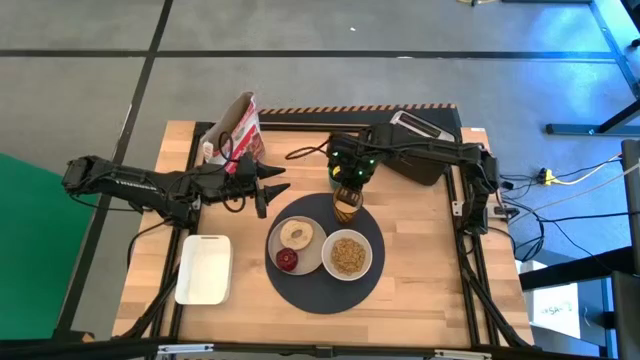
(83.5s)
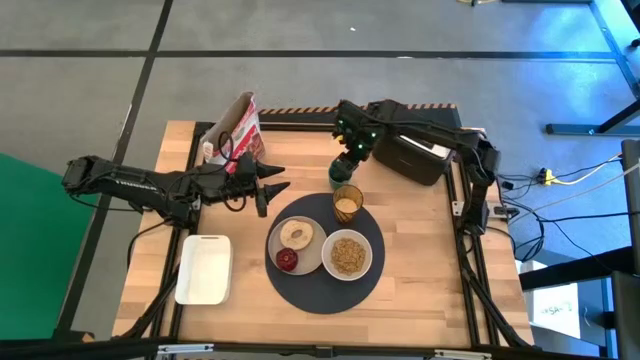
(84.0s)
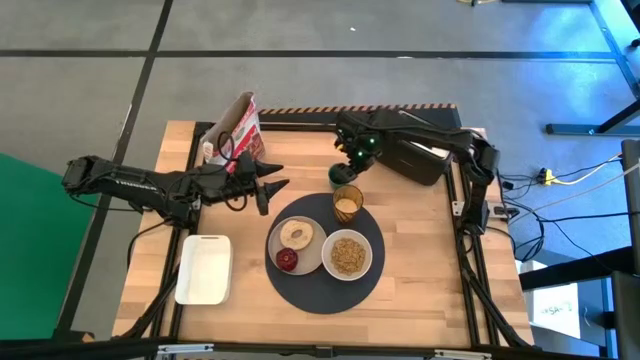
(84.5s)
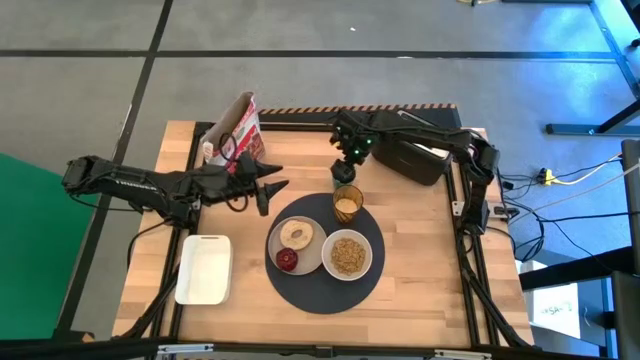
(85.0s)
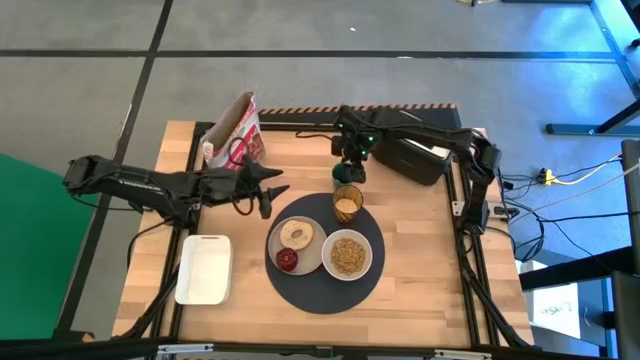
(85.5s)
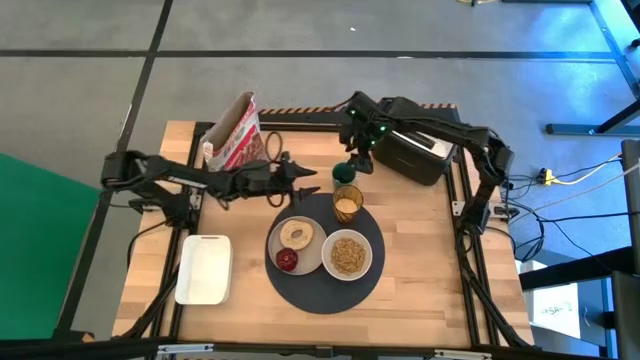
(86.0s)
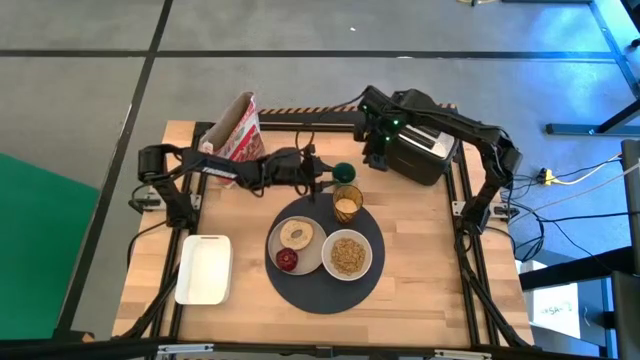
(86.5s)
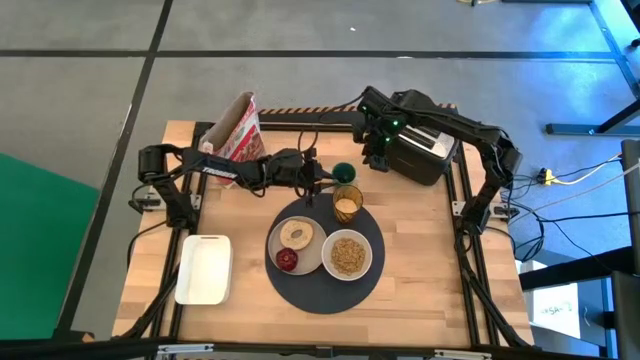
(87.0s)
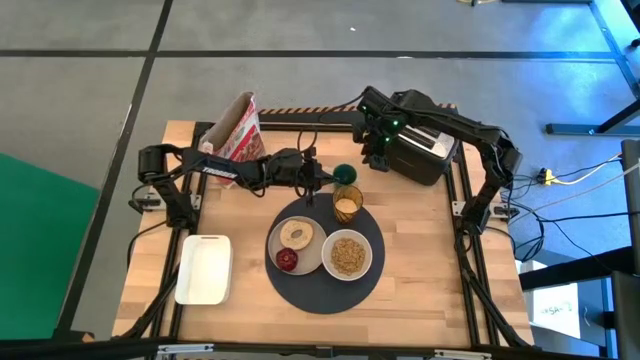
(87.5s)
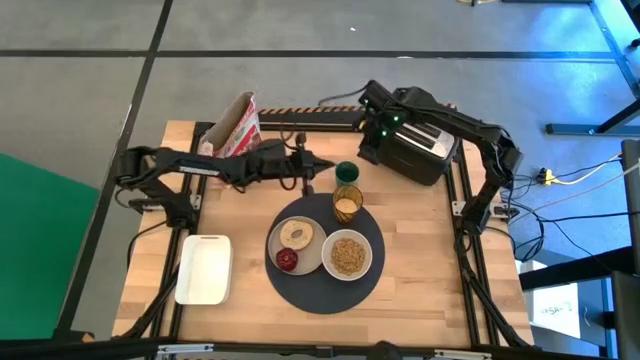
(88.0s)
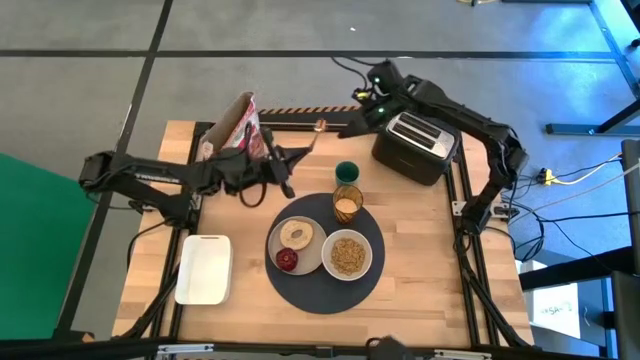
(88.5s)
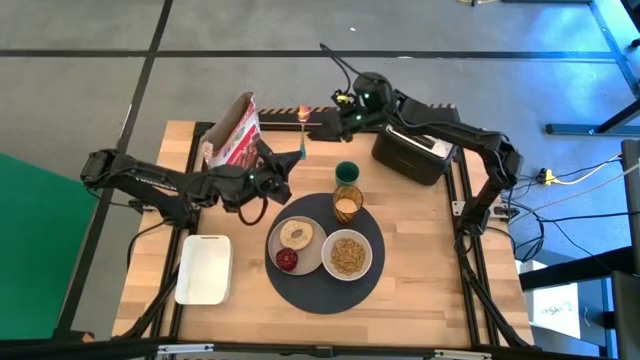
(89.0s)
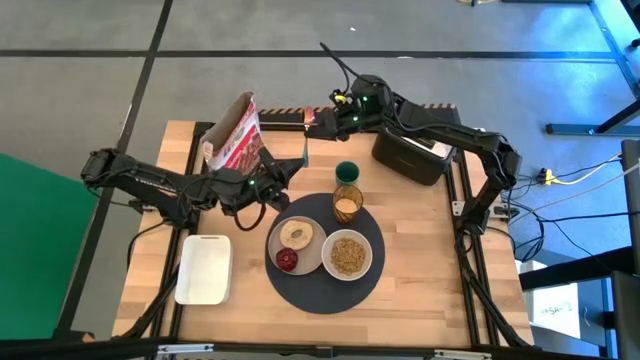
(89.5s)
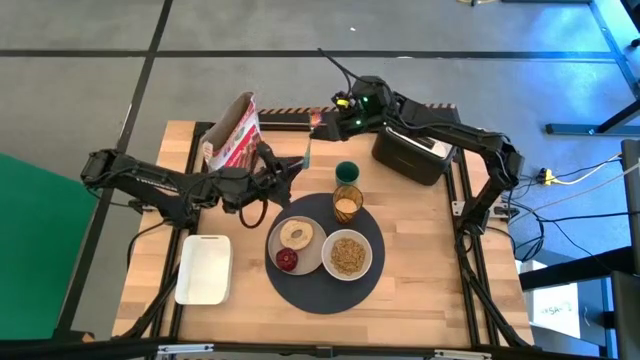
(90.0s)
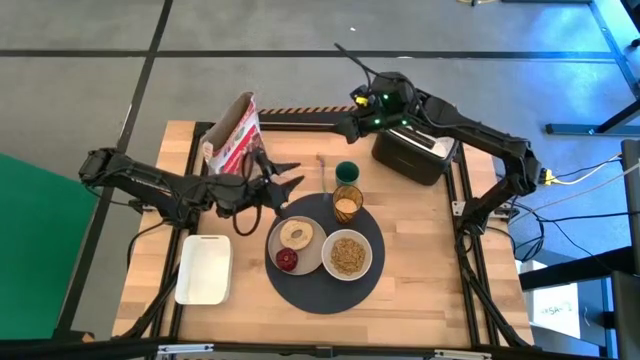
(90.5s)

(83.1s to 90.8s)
Task: Arrange a breakfast setting
Put the iridescent spoon on the black mat

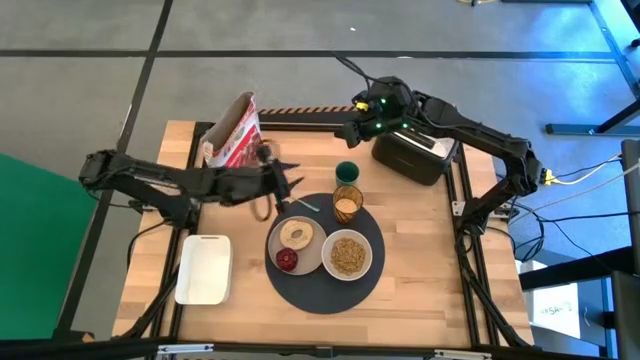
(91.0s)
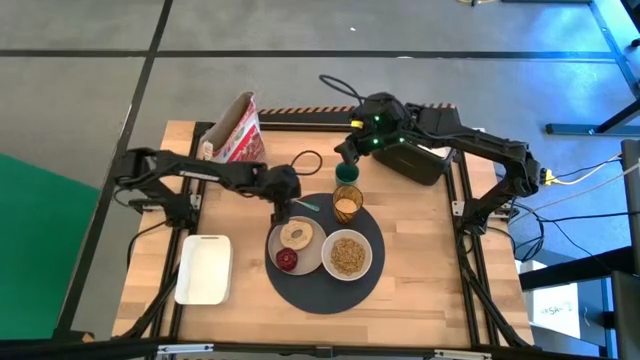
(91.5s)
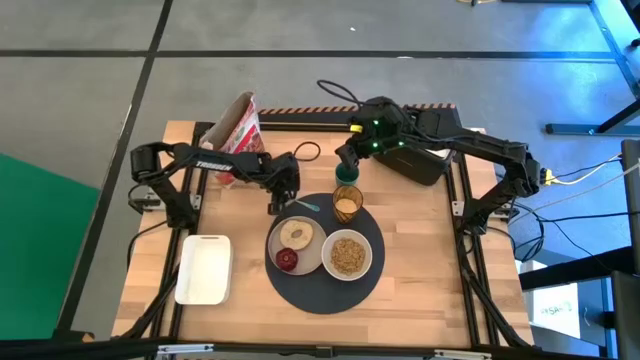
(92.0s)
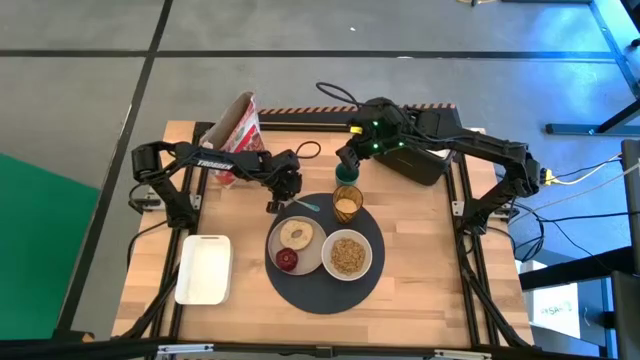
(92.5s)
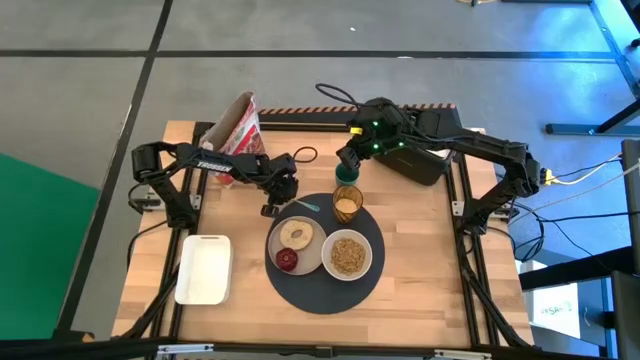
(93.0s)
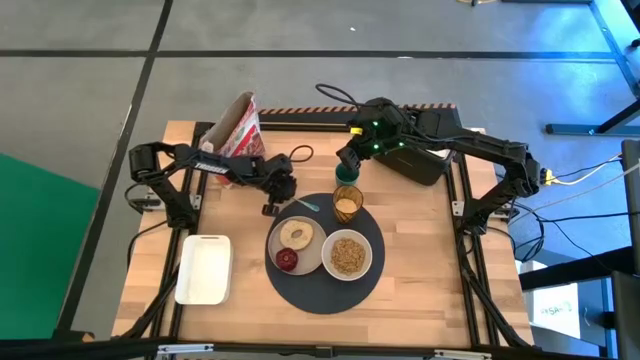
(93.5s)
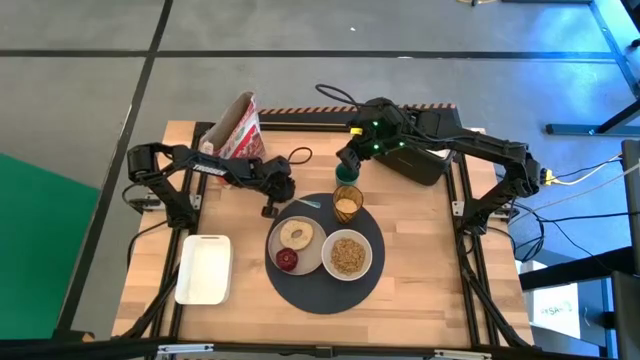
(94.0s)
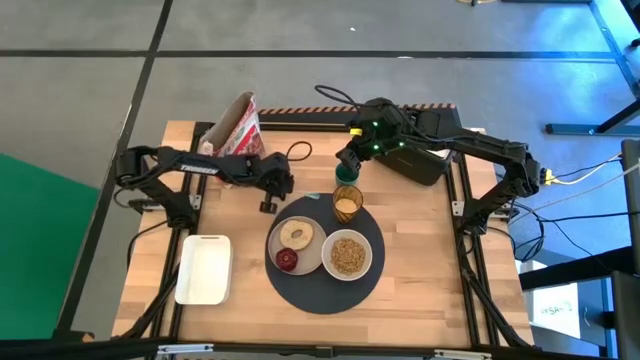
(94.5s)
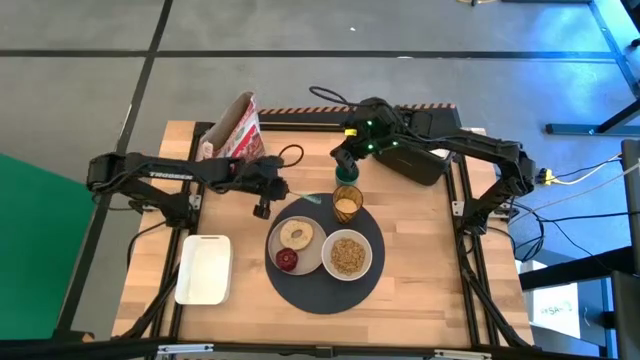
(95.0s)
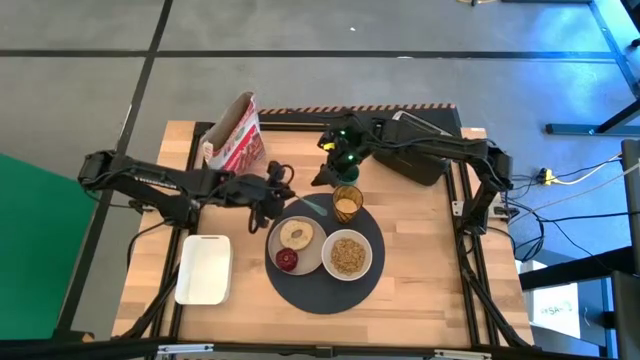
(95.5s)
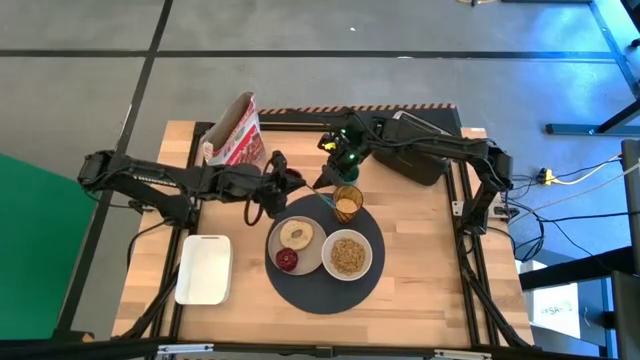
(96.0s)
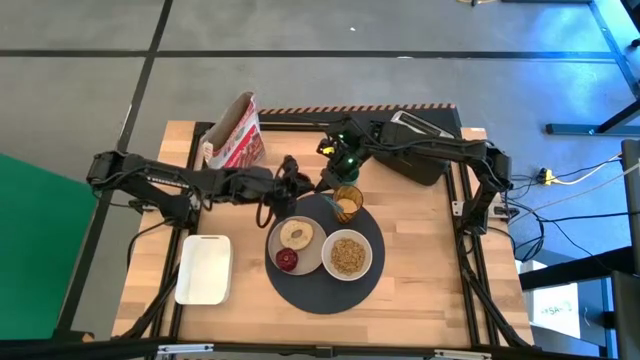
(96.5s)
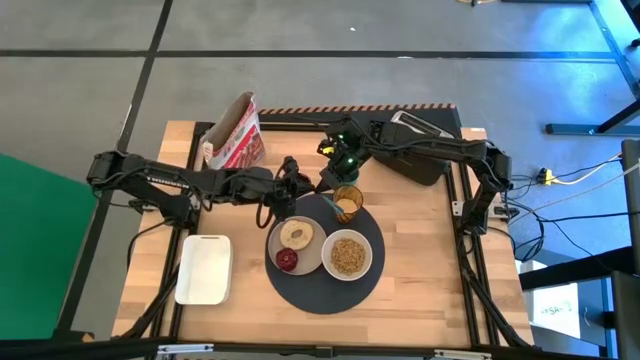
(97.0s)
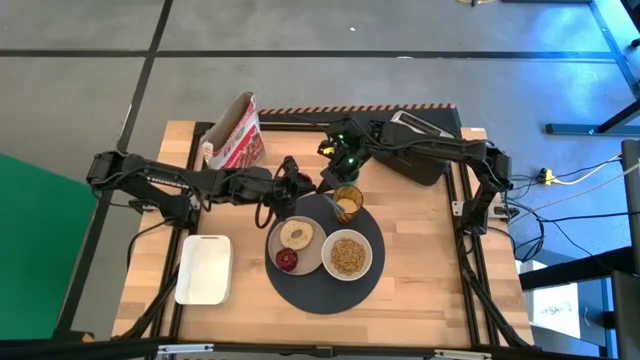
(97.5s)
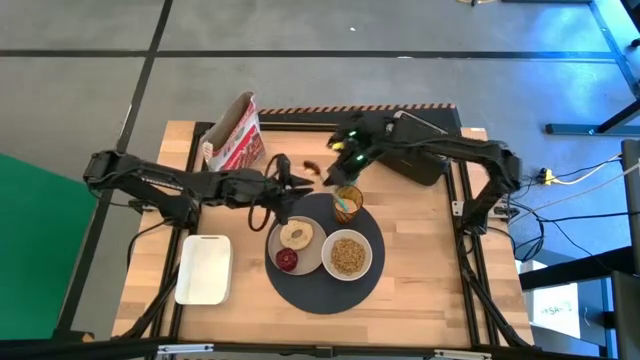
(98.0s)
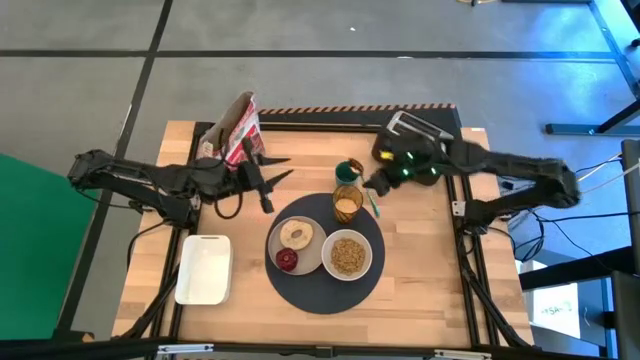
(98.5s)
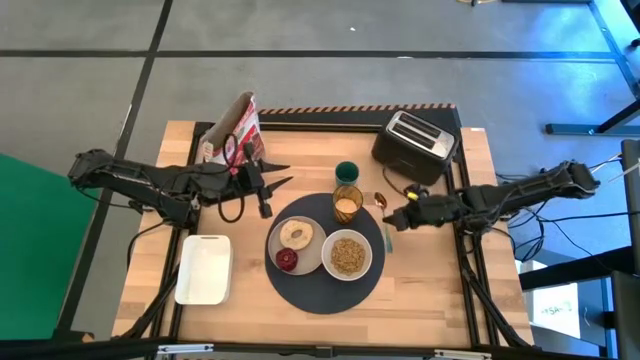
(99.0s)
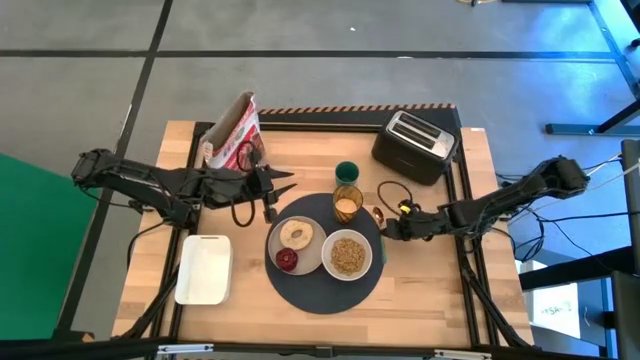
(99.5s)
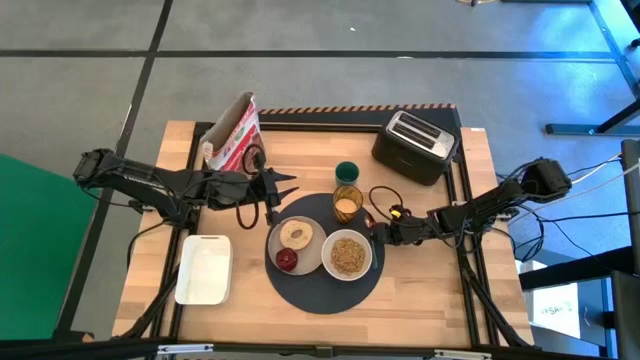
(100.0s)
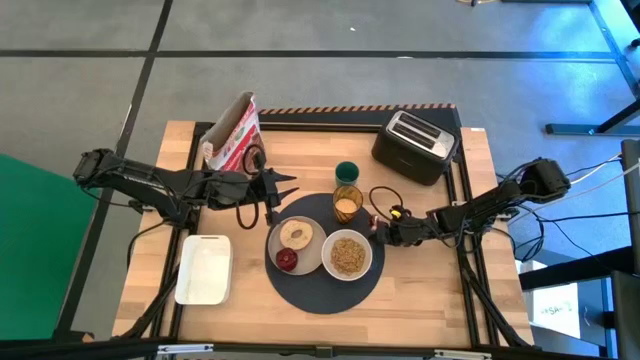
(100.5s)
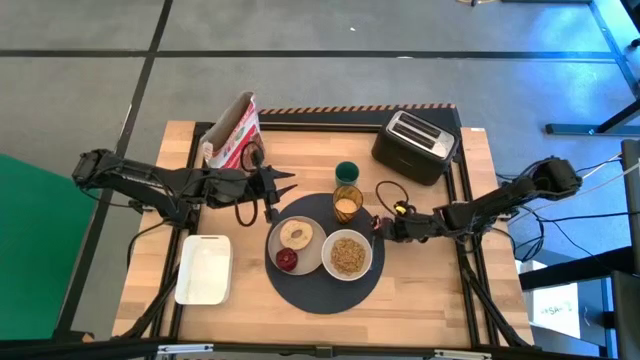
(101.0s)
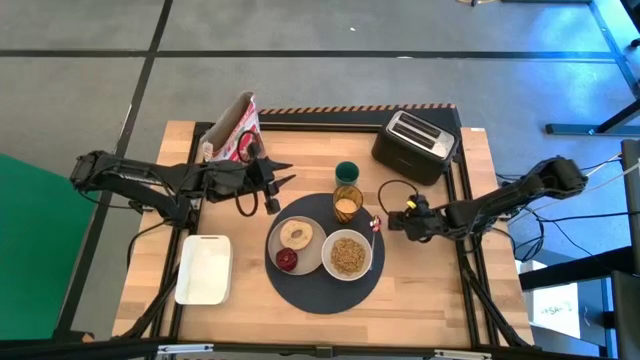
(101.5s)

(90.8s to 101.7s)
Put the blue spoon on the black mat

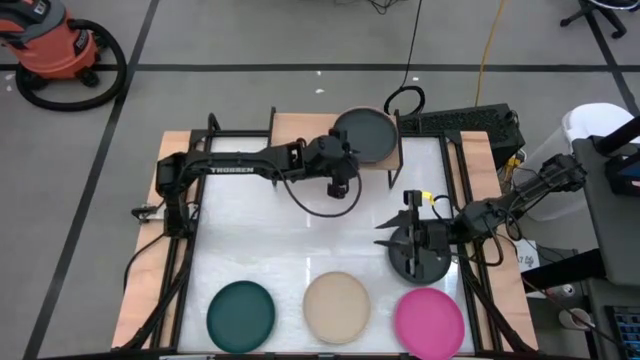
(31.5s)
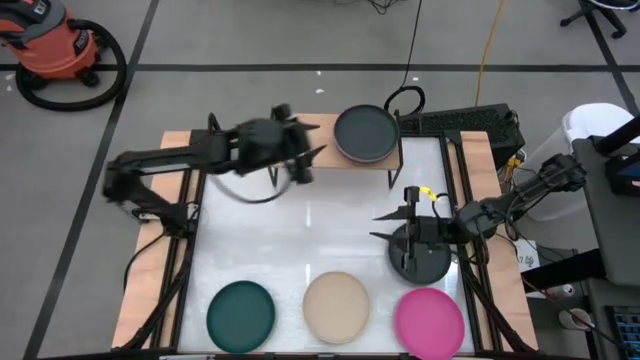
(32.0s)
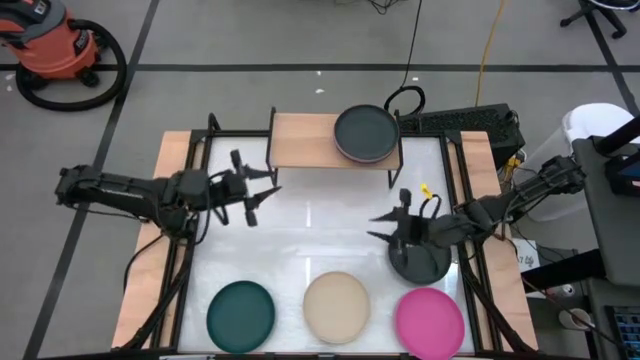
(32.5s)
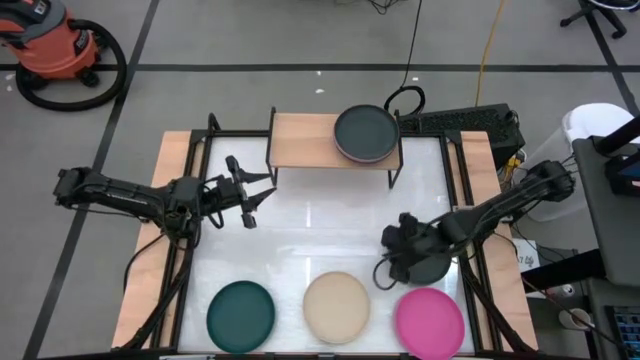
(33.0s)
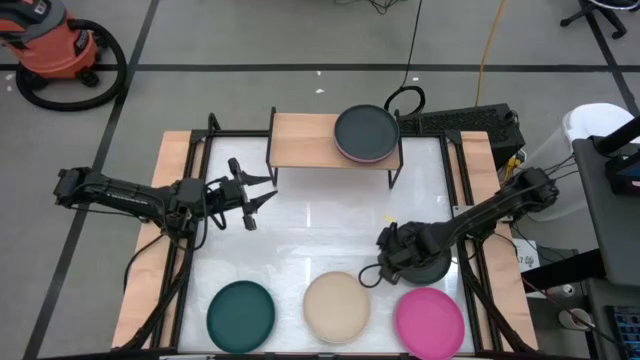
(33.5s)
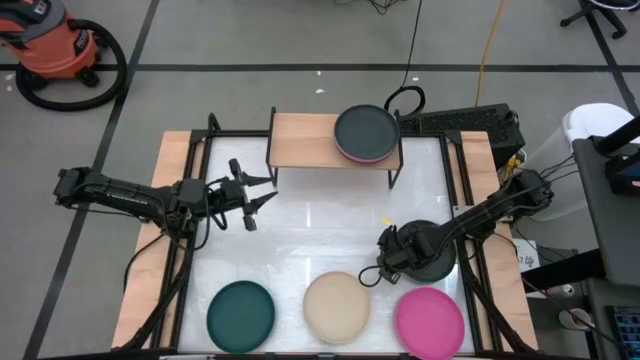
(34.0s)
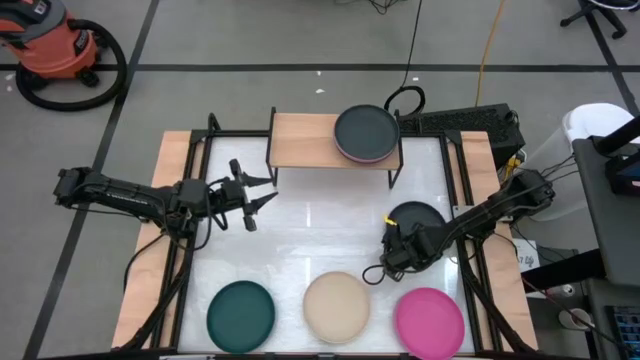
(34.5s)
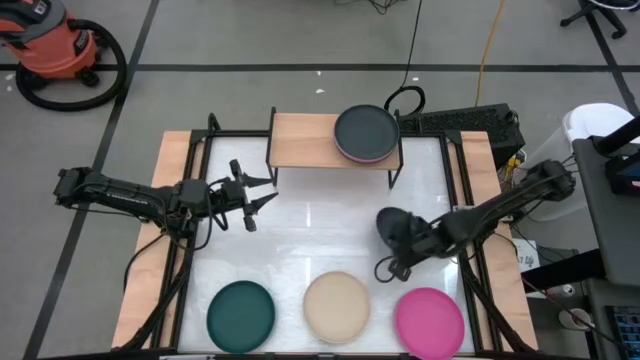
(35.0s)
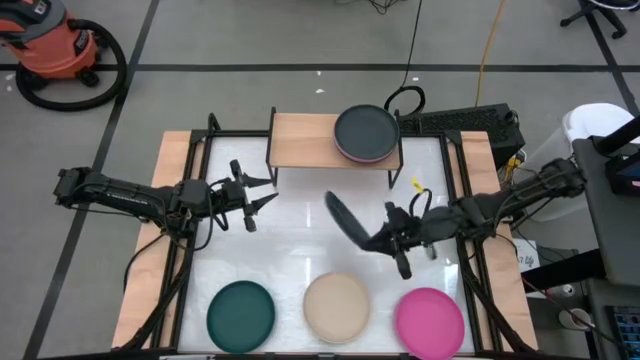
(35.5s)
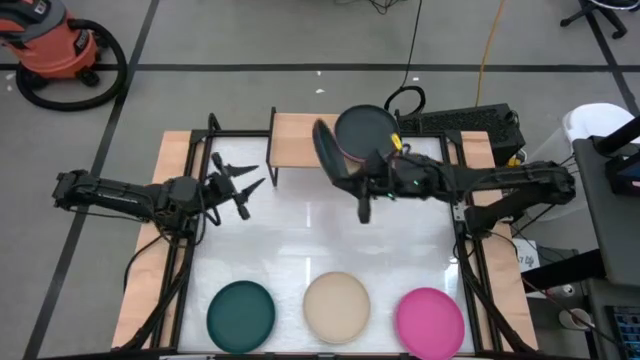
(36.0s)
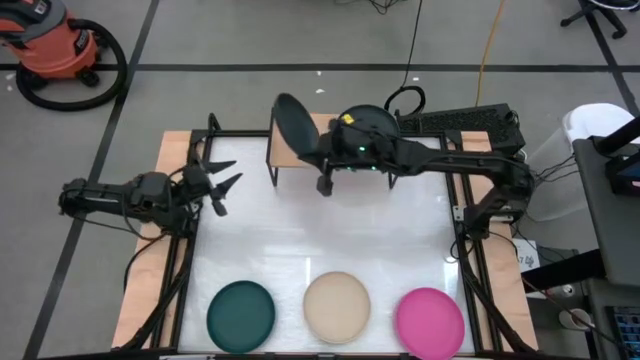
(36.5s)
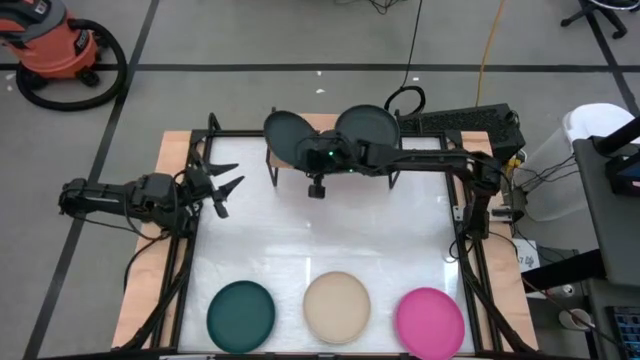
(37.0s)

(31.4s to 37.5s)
Task: Place and stack plates onto a shelf
Put the black plate on the shelf
